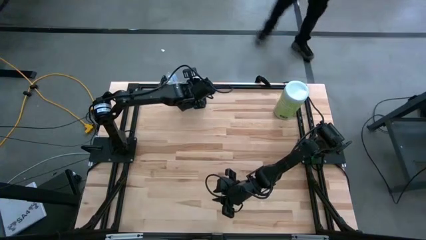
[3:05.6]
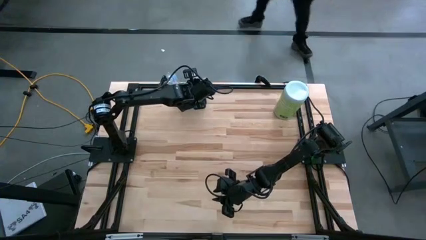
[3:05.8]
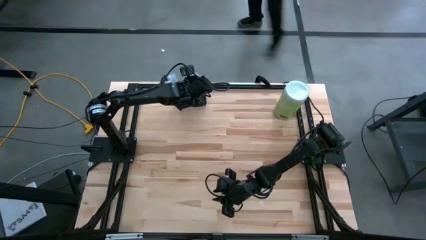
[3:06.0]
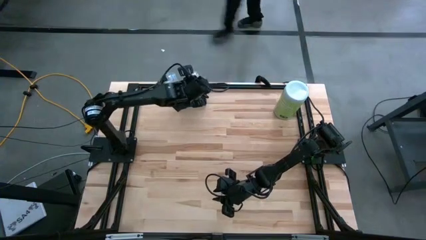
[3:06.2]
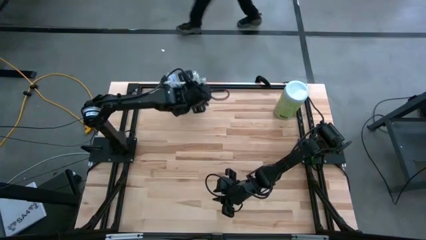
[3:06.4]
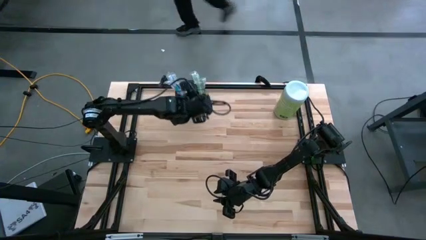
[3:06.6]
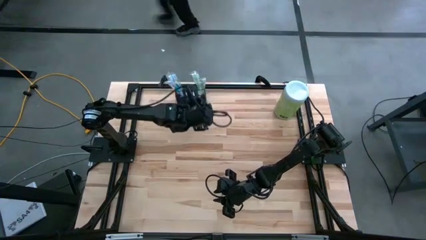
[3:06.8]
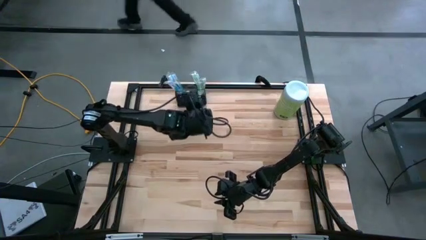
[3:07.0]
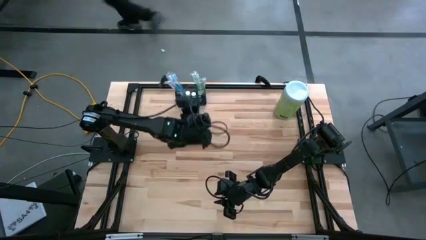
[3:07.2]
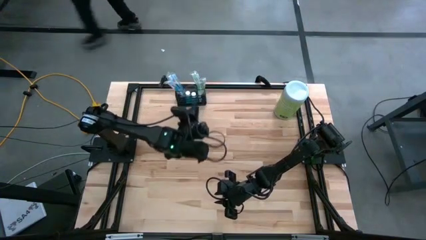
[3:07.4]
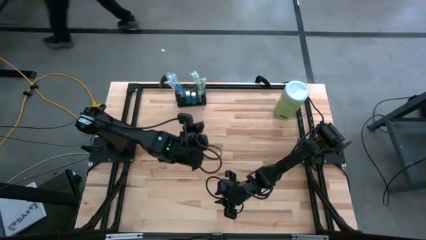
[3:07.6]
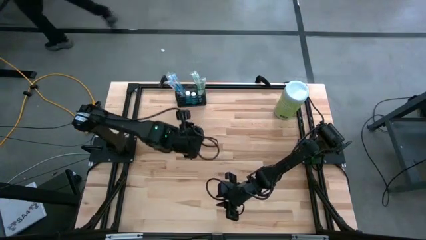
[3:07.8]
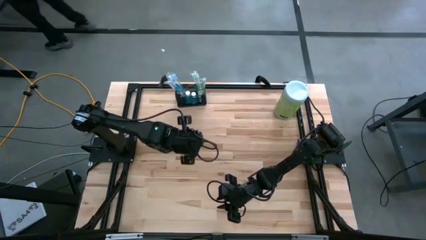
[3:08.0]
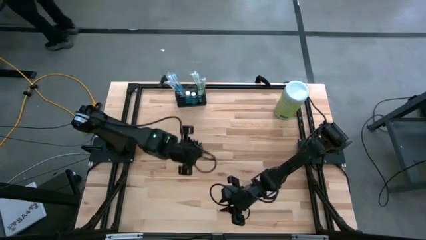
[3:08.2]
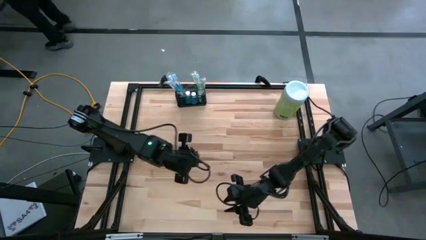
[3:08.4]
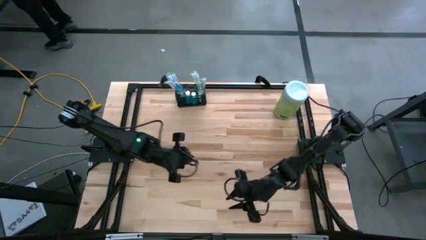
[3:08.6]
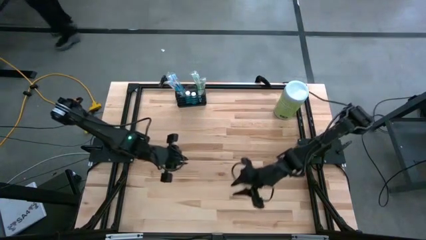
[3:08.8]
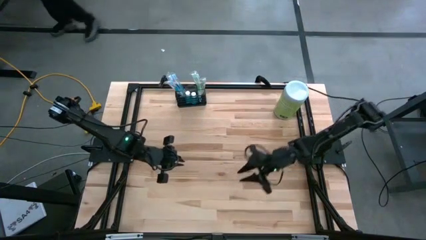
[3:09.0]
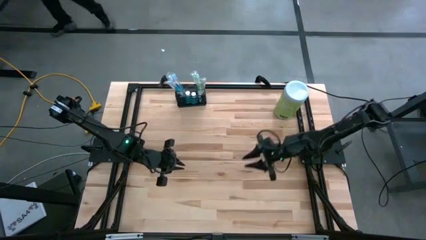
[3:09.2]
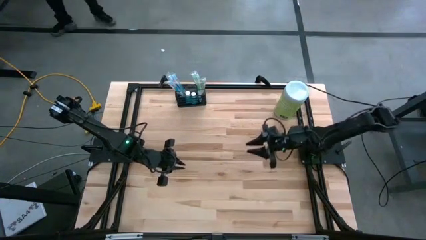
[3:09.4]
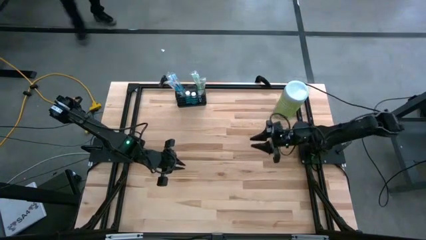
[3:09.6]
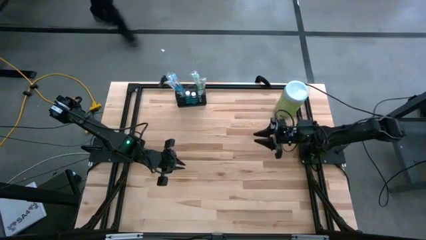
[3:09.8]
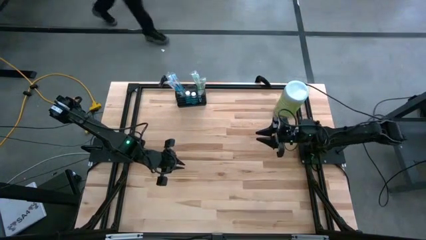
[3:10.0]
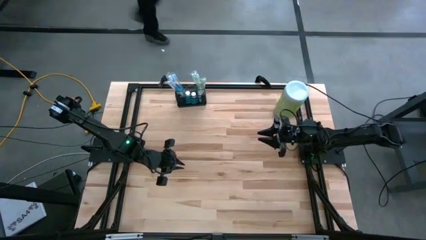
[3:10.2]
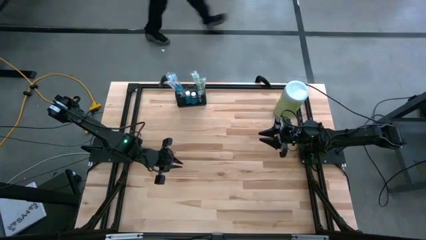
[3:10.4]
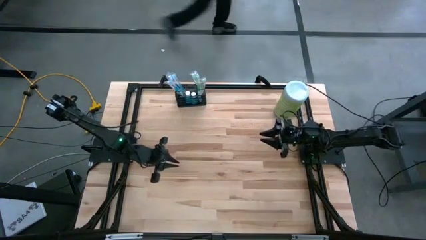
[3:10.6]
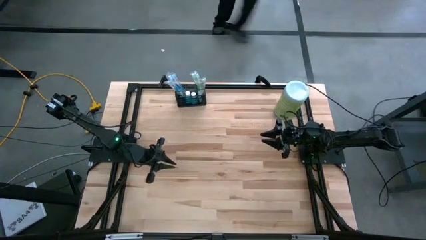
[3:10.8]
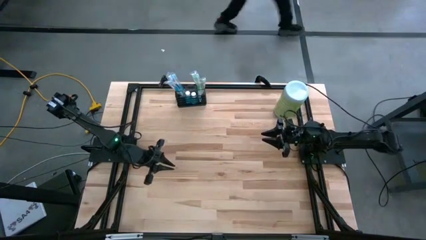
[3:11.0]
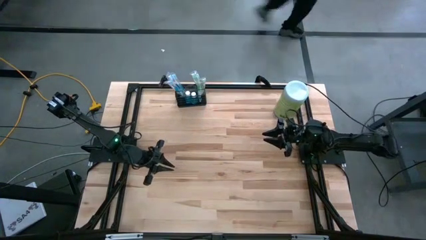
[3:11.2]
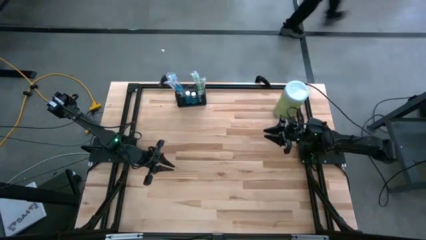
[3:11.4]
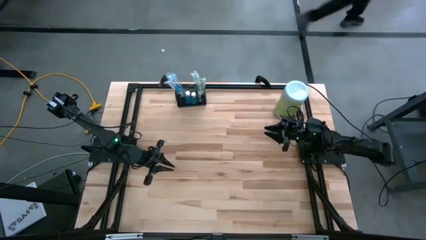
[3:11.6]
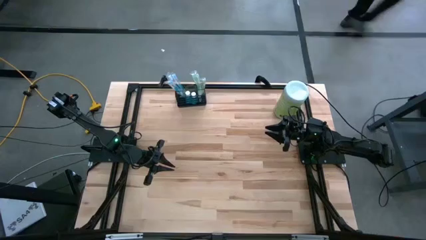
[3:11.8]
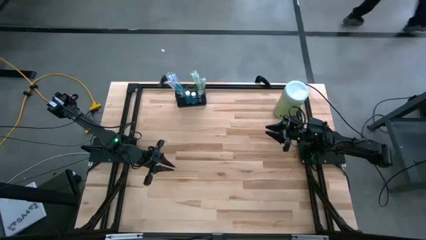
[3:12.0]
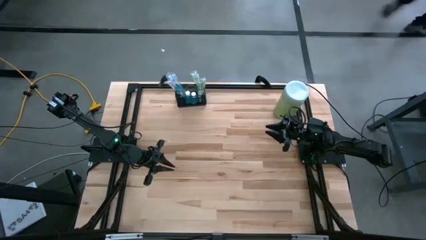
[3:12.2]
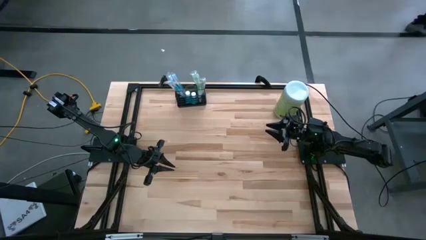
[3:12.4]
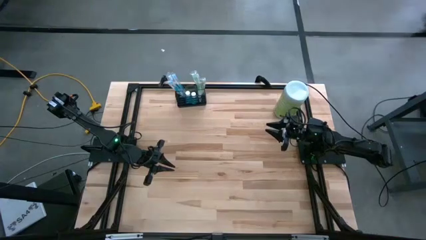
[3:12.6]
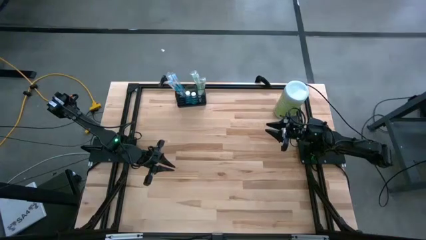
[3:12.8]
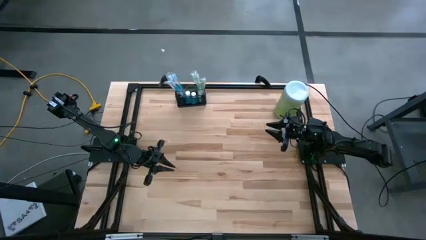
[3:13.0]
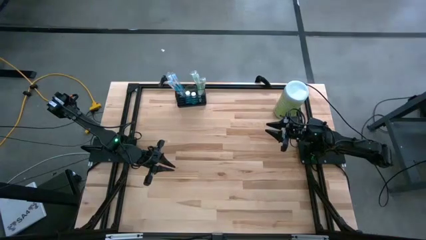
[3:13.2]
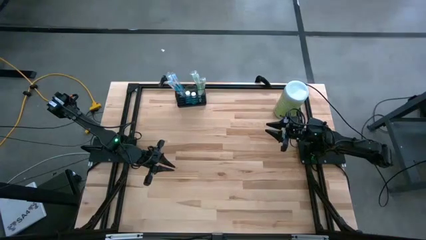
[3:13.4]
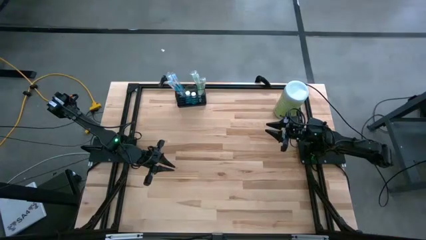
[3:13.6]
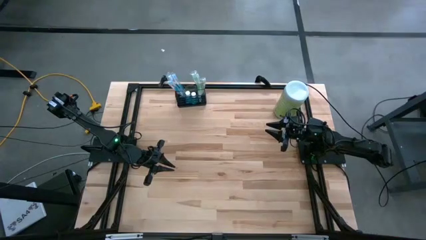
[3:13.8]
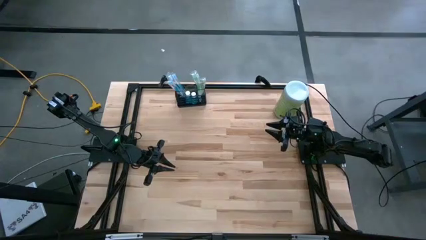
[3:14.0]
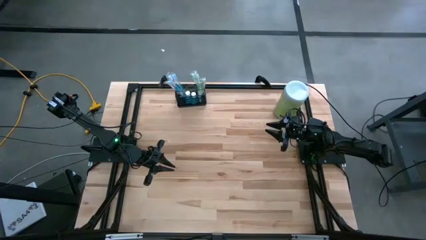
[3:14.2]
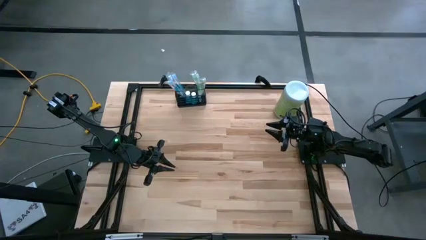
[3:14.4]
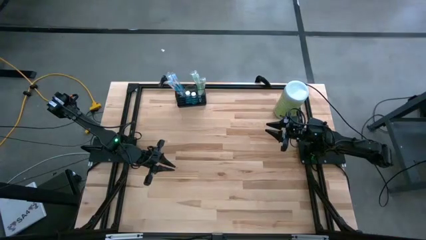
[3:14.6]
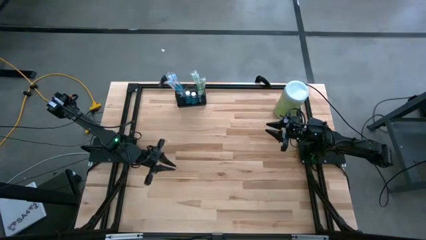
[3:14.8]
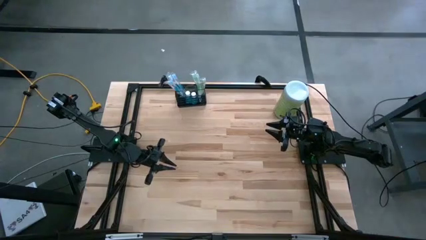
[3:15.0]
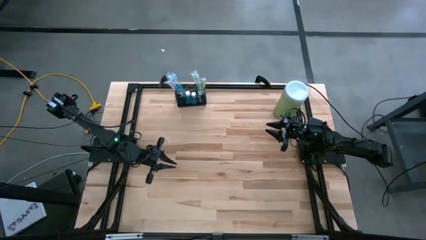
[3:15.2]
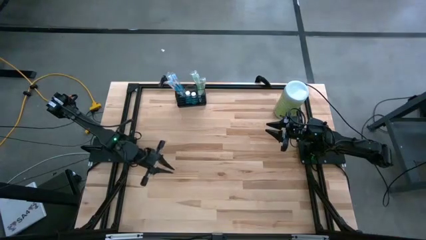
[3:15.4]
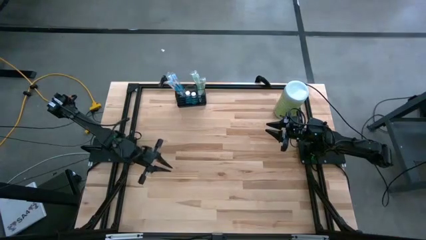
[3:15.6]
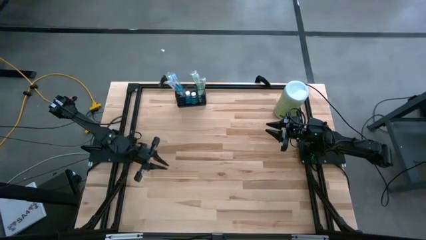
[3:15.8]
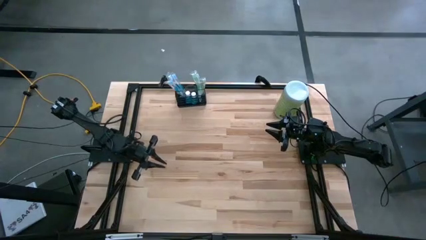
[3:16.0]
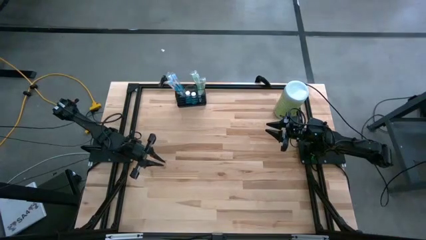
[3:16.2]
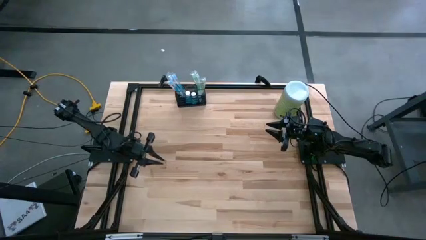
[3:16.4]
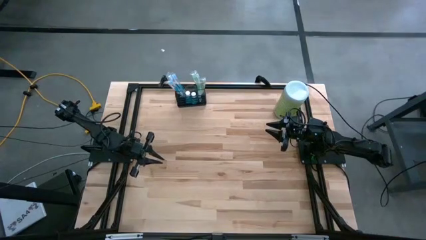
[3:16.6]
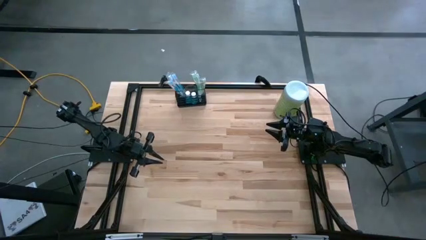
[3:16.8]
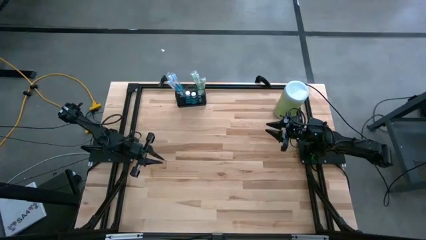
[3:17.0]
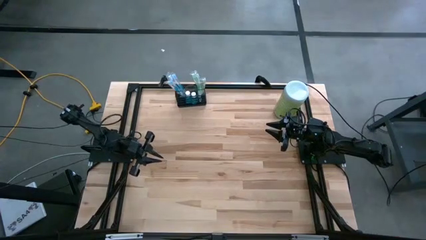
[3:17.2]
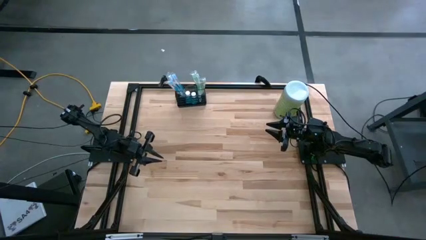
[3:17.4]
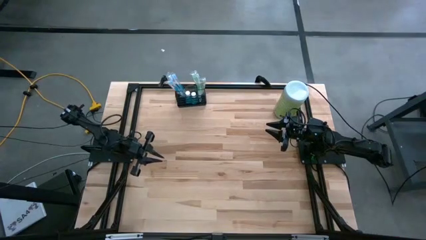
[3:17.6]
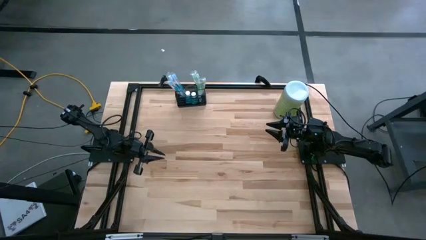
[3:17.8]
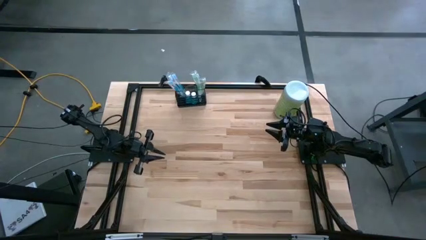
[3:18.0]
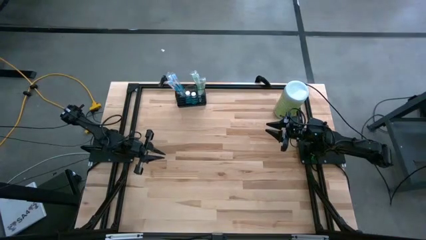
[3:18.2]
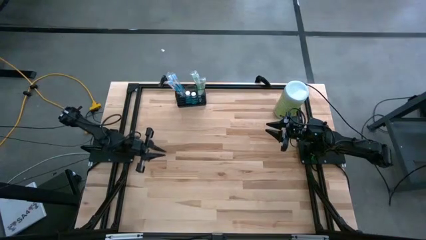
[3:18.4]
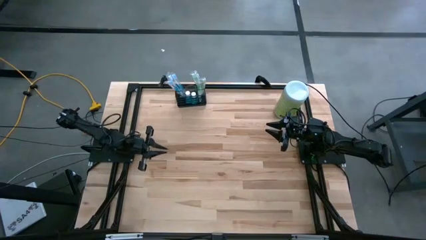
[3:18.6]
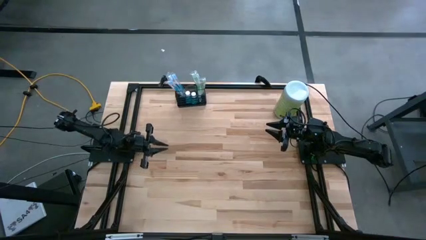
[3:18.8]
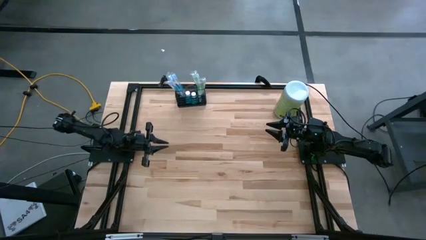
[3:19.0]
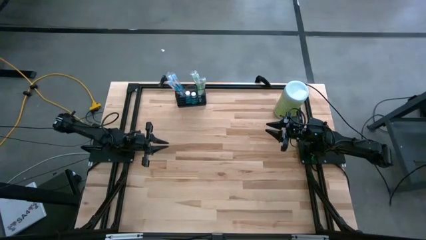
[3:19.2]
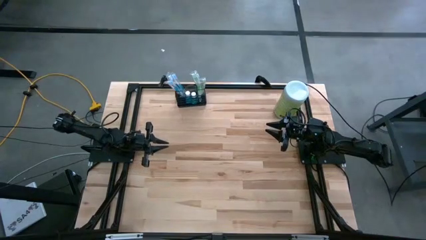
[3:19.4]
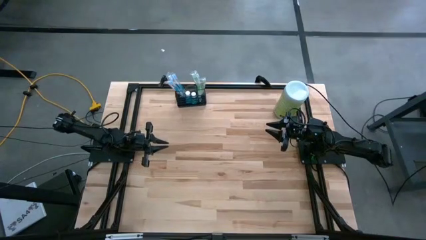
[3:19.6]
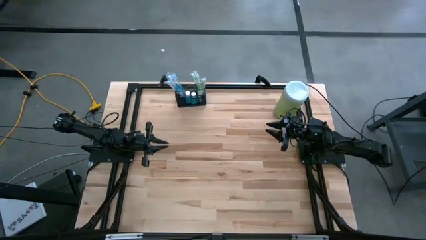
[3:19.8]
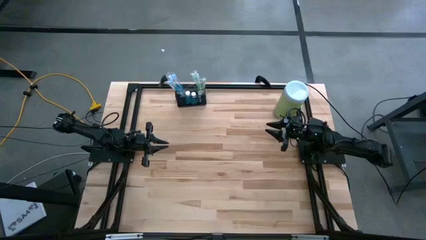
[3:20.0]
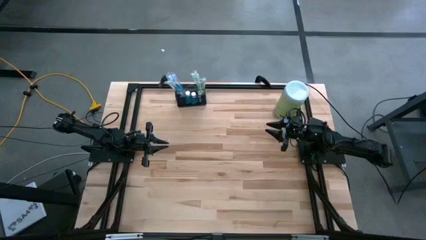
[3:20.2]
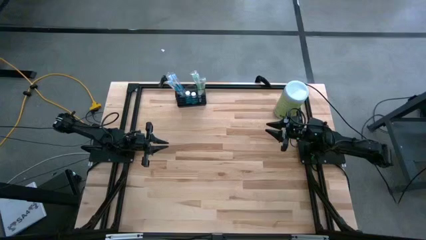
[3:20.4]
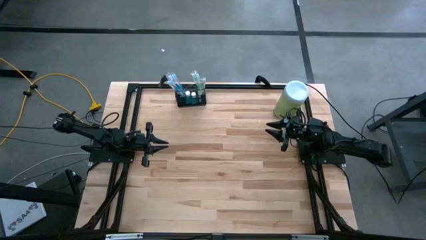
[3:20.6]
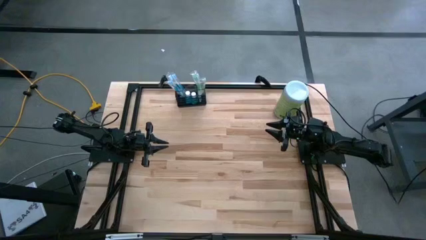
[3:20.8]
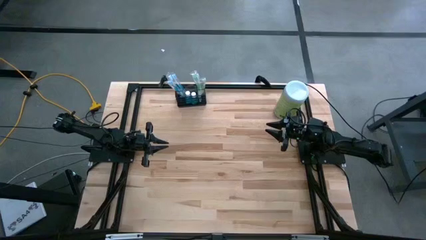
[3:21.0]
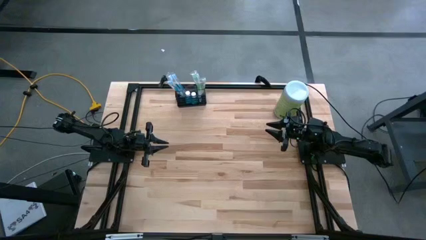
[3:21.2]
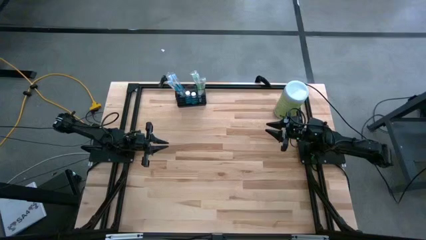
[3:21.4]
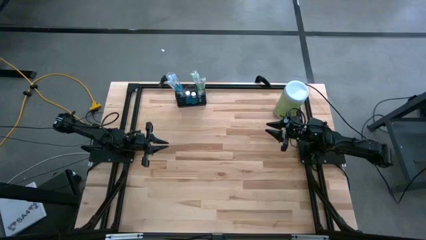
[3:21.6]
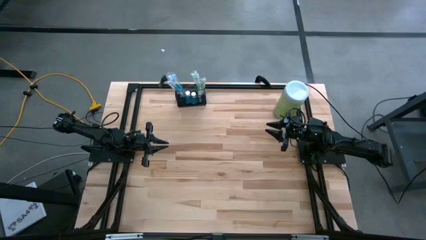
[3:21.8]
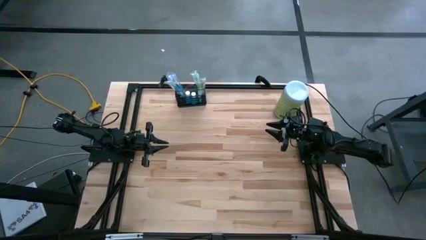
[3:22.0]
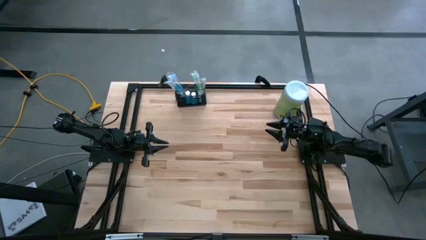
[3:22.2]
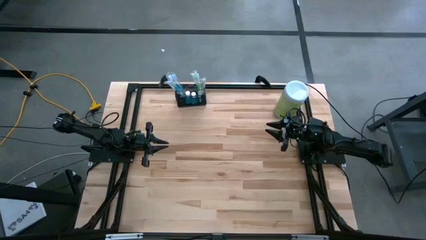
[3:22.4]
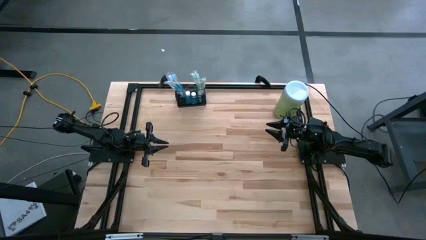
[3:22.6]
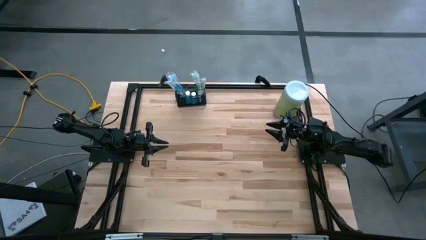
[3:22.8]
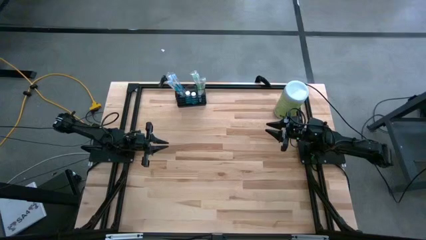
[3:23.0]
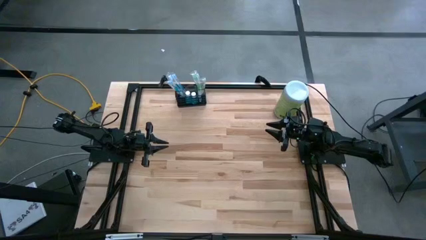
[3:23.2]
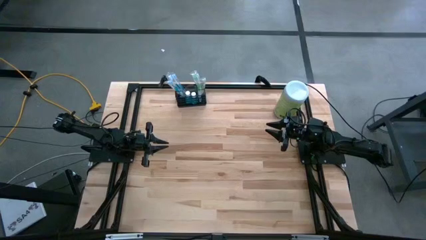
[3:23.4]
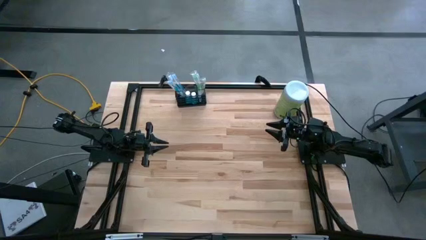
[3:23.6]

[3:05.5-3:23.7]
Task: Pick & Place toothbrushing station
Return to Home Position
